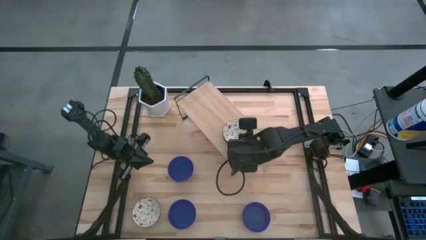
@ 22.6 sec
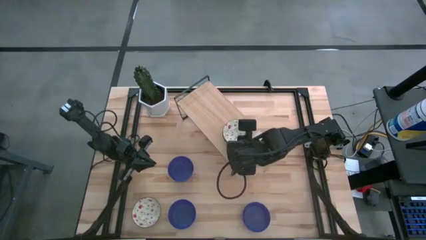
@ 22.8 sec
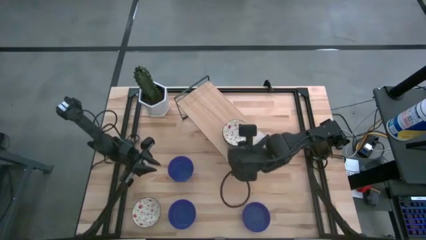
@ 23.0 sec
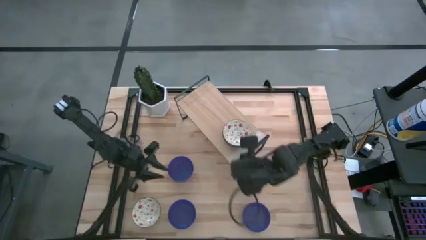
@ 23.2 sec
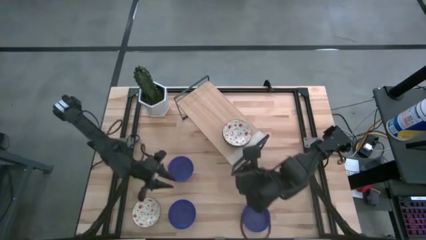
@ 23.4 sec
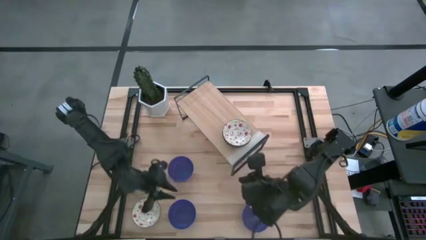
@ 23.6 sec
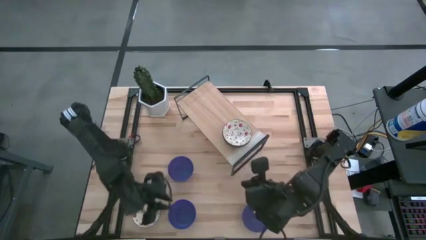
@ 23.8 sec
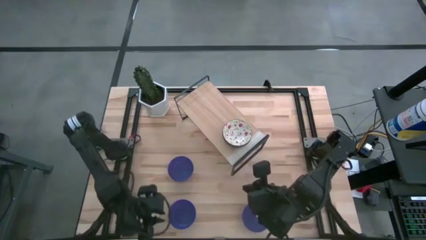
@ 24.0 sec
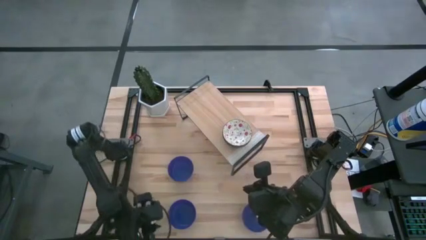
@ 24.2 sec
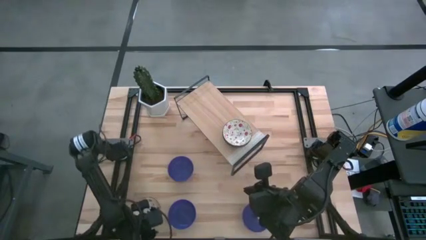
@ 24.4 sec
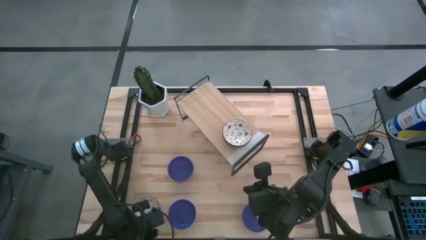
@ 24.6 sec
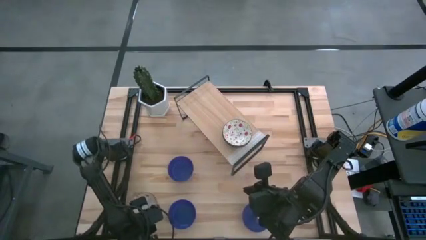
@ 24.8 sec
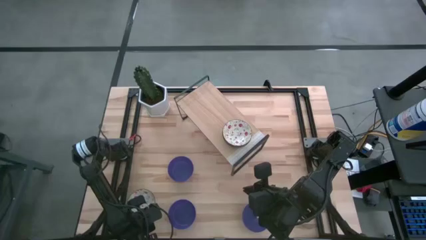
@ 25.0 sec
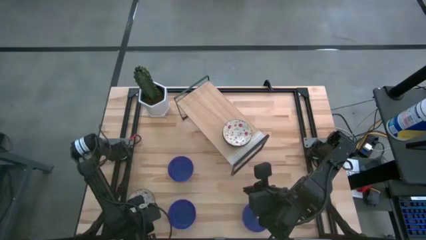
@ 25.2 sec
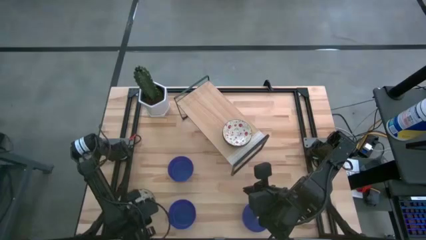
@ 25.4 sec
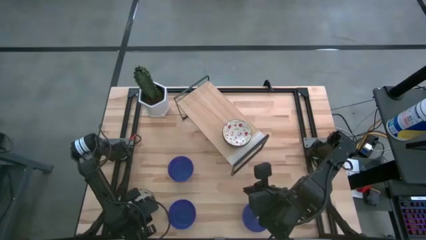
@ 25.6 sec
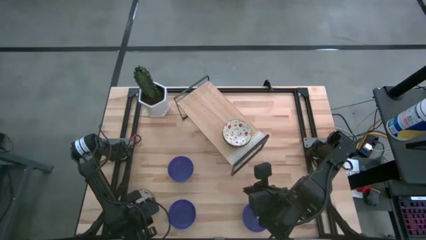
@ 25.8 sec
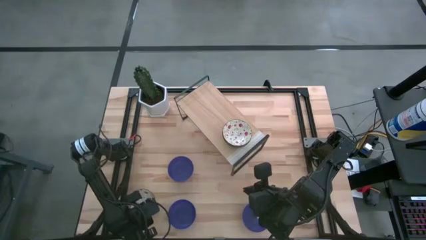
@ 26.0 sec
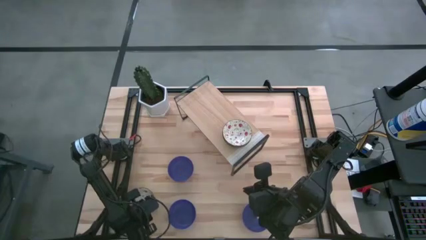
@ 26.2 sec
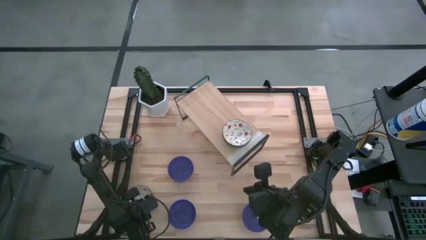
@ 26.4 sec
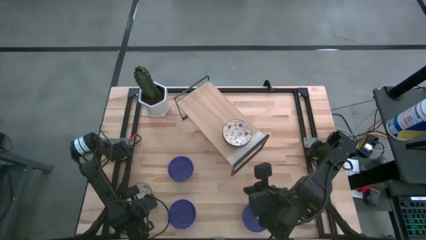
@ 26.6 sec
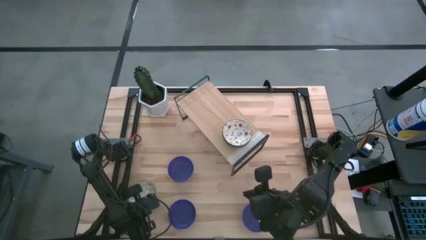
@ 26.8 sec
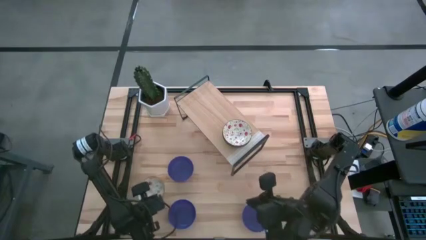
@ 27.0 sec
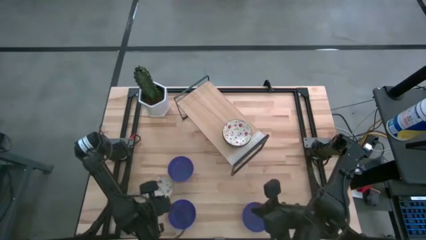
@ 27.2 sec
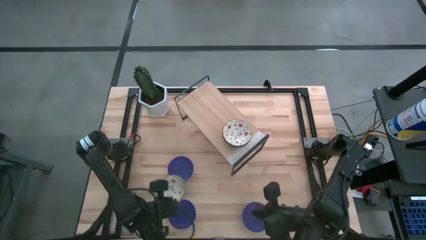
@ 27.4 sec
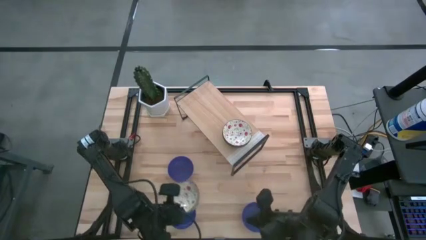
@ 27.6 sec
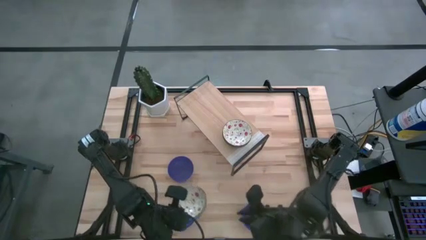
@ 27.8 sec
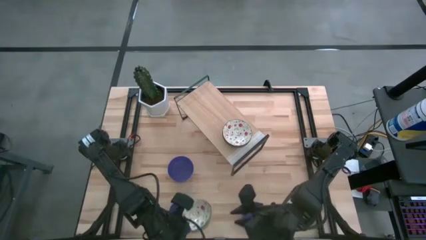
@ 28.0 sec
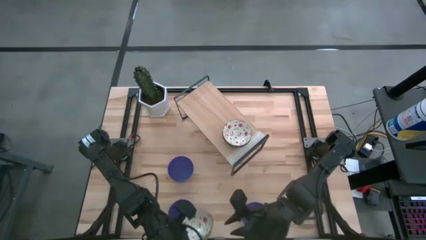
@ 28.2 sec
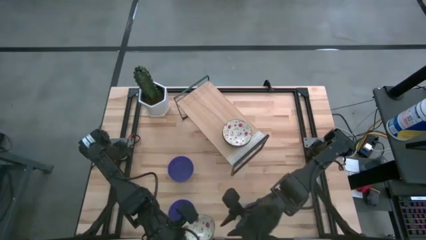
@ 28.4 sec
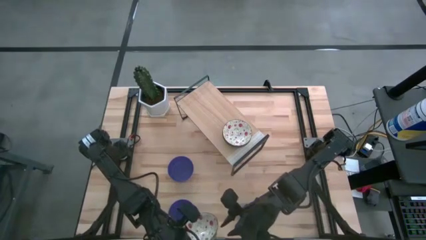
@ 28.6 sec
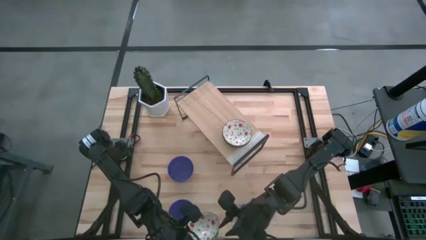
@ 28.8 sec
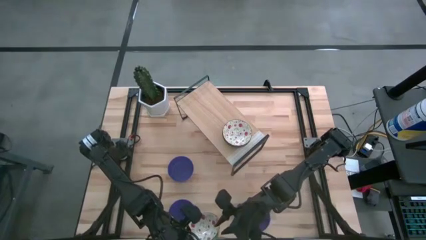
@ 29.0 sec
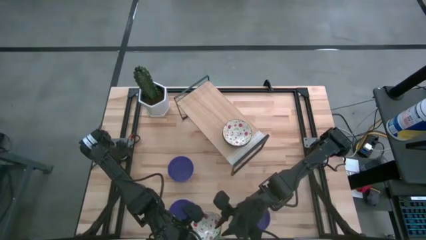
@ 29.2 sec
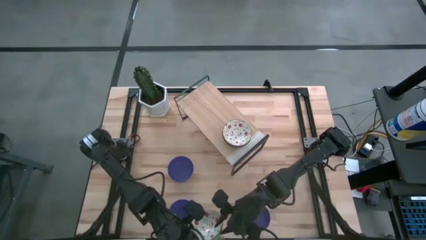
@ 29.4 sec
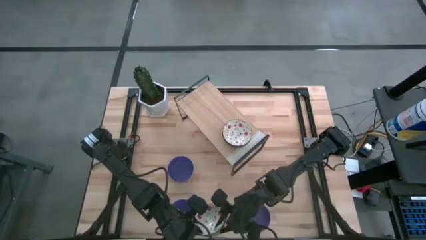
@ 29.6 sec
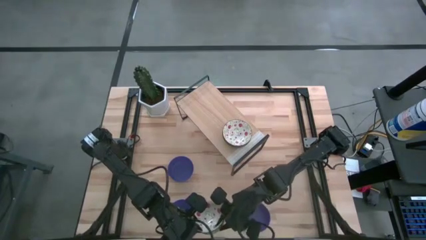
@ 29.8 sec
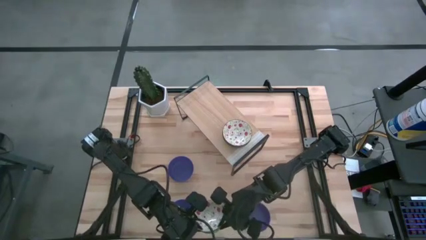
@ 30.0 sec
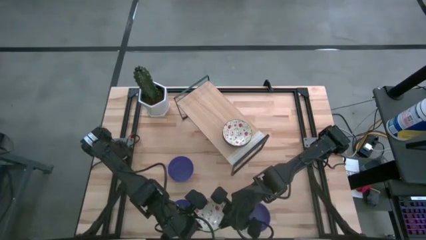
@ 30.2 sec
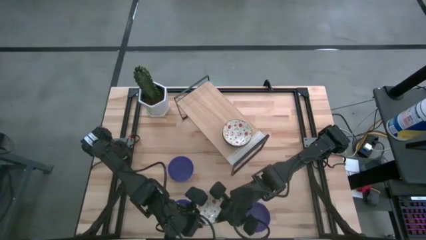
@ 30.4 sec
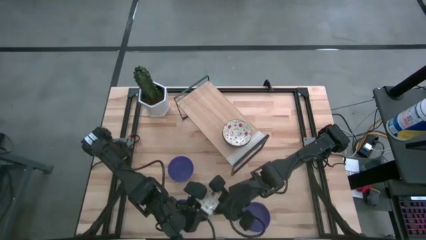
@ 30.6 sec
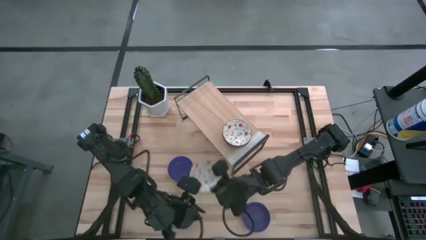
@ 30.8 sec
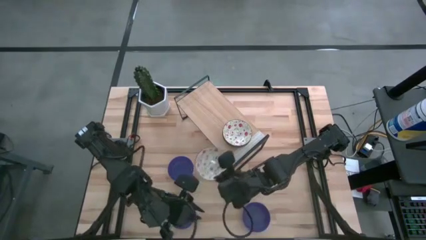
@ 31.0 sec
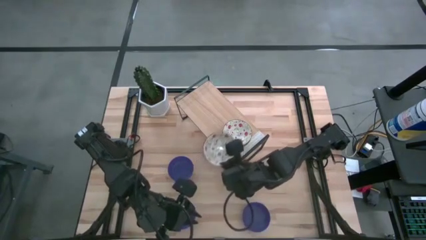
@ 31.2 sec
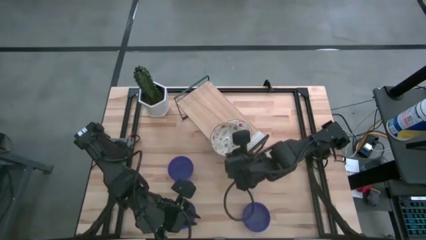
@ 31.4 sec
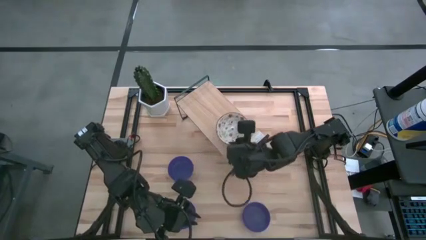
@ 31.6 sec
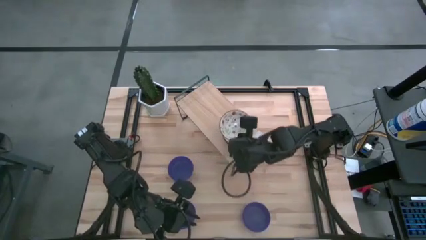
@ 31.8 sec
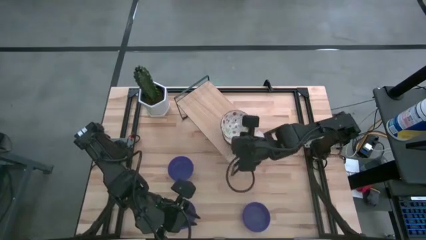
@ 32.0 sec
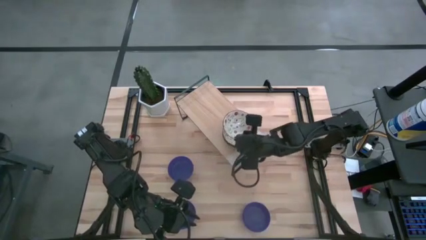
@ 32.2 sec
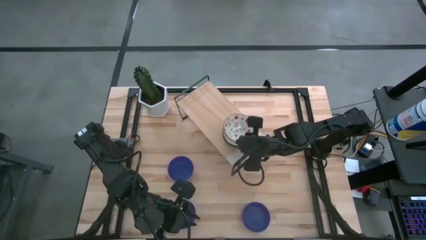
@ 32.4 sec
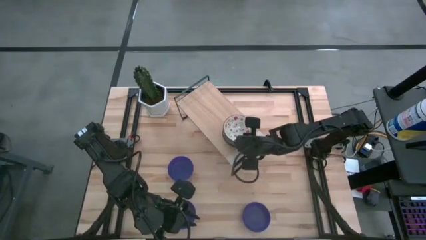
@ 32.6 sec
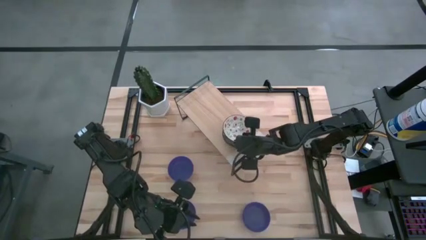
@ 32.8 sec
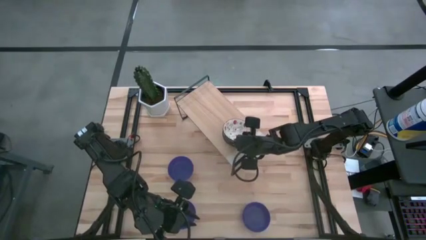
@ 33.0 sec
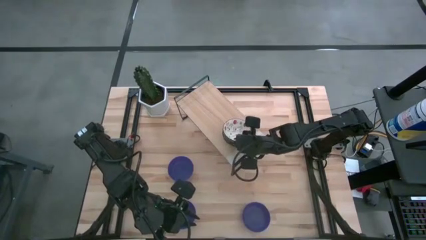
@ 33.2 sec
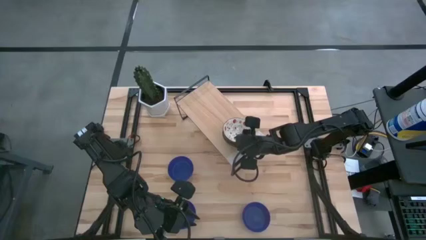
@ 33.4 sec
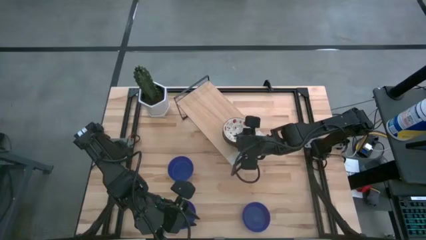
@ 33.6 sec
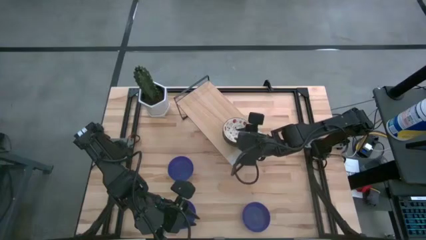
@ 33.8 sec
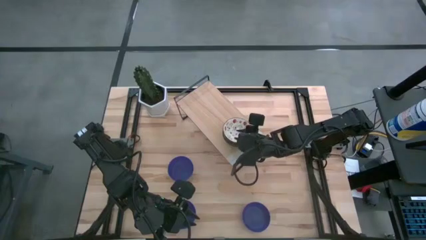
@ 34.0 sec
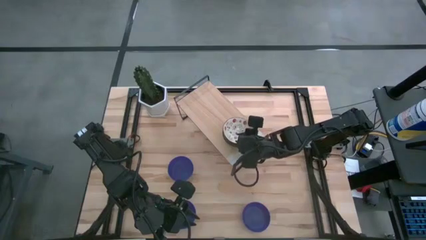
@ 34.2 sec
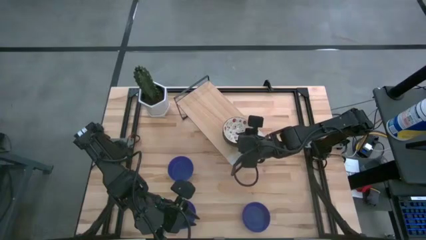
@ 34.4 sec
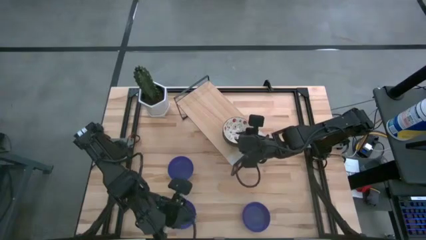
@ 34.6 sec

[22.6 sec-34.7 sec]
Task: Pick & Place Mini bowls
Stack the white patterned bowl on the other white patterned bowls on the shelf

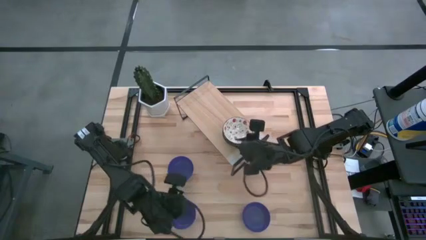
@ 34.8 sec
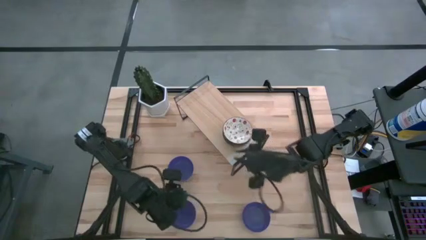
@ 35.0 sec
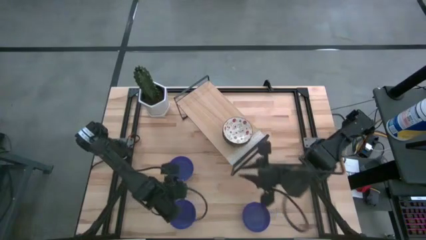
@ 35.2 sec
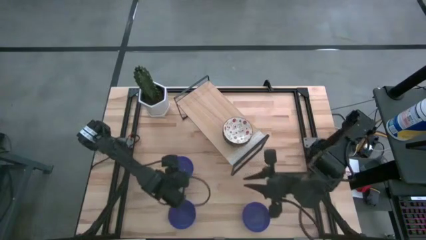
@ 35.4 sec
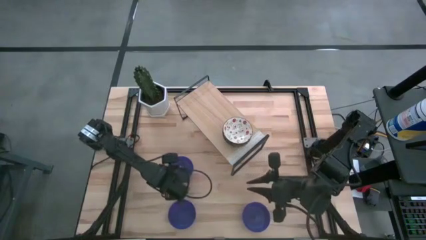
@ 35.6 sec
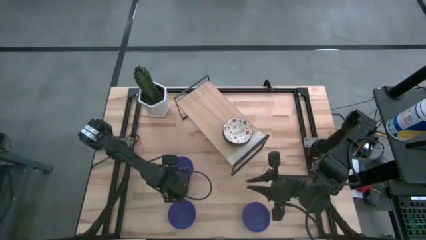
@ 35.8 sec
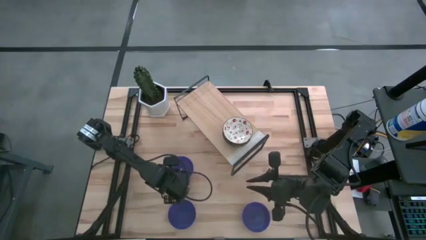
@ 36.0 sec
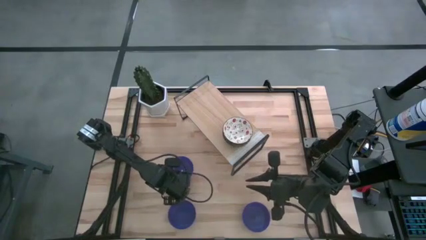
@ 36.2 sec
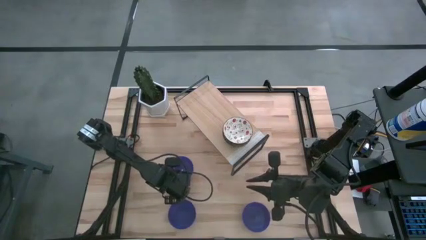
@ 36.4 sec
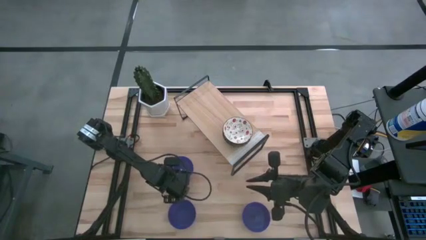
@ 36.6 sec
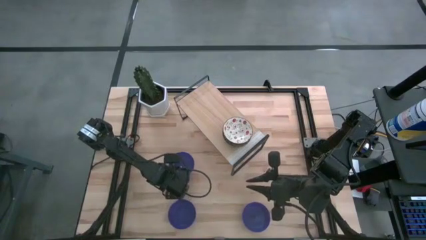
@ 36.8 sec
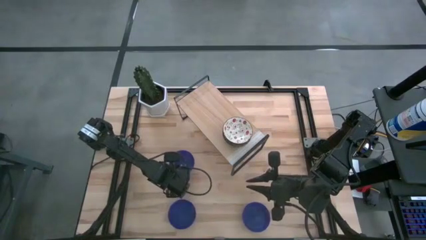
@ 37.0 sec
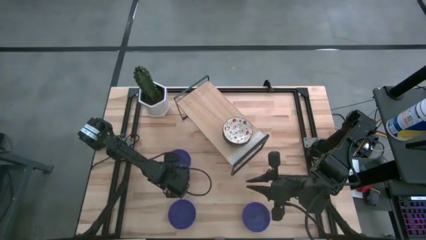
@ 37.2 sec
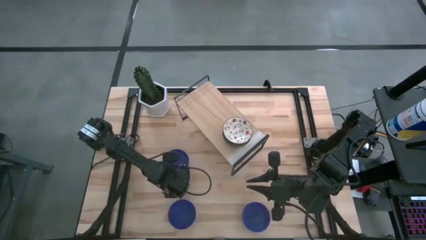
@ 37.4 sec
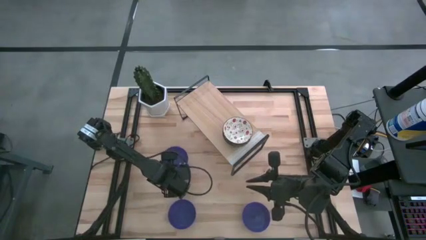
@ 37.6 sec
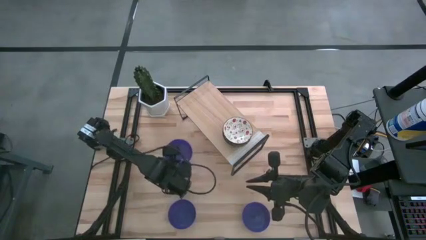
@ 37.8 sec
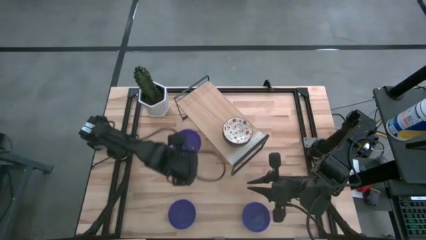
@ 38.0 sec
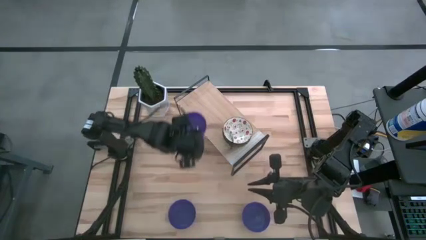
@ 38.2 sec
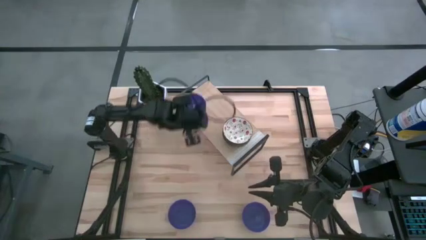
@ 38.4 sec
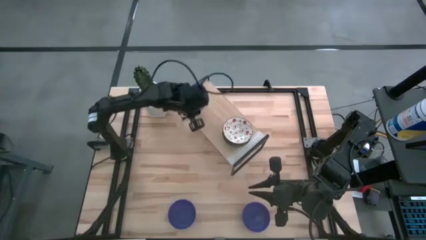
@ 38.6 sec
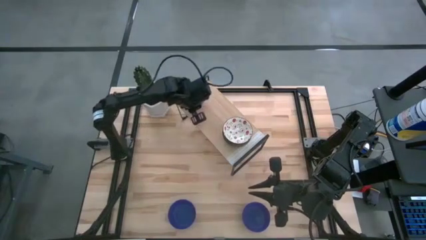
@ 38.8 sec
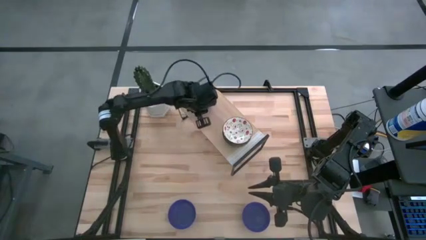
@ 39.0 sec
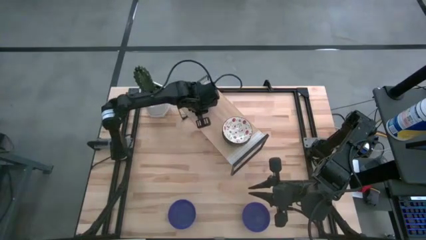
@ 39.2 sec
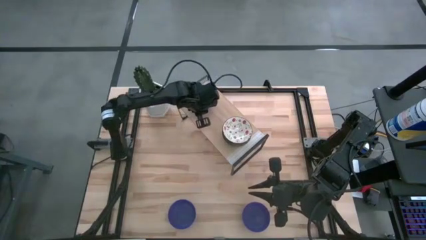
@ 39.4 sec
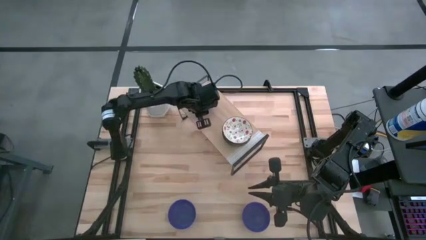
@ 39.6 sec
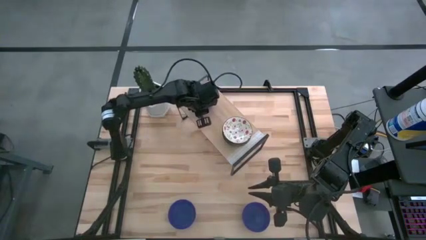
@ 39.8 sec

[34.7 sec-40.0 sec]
Put the top blue bowl on the shelf
